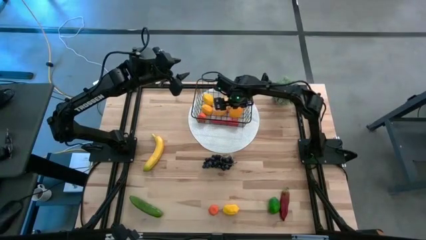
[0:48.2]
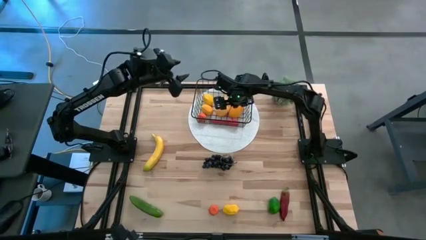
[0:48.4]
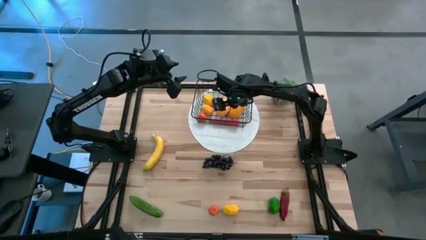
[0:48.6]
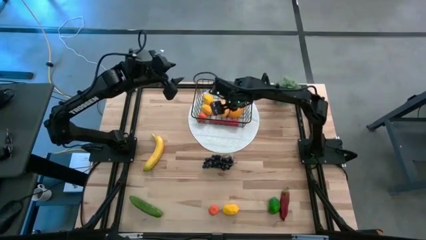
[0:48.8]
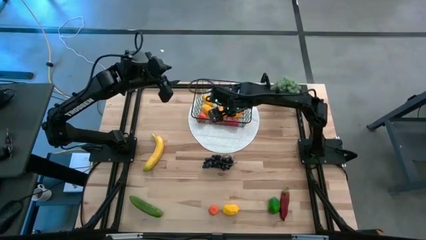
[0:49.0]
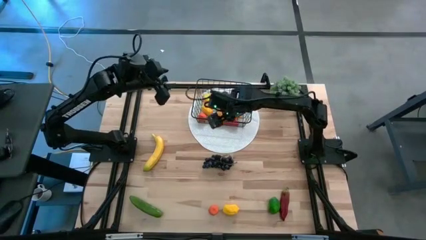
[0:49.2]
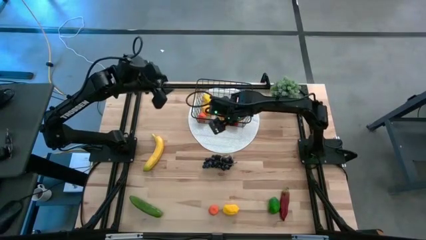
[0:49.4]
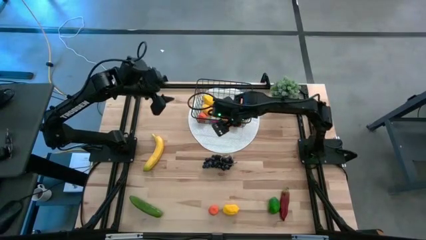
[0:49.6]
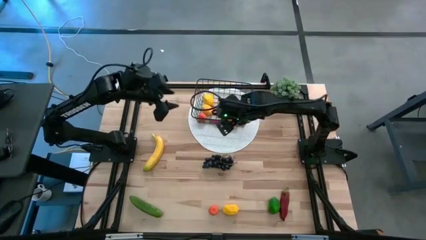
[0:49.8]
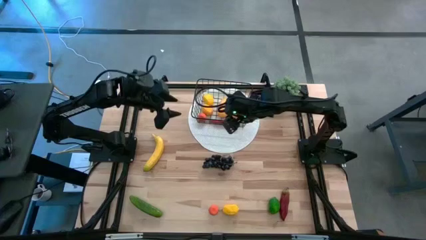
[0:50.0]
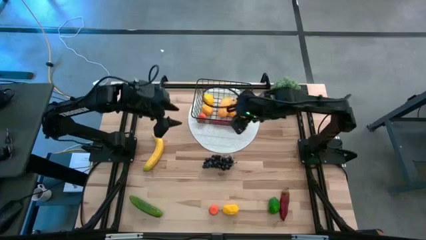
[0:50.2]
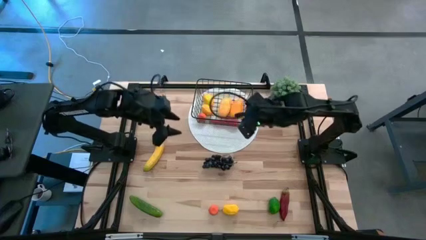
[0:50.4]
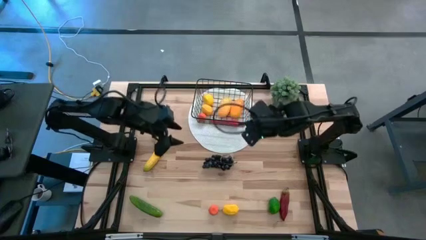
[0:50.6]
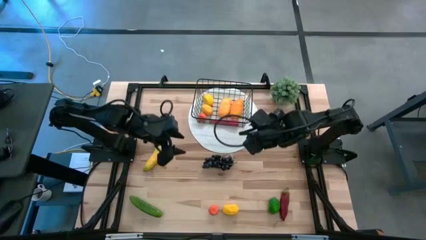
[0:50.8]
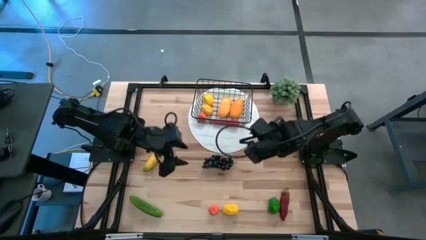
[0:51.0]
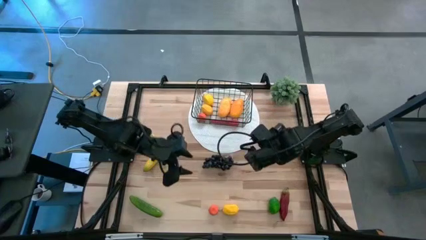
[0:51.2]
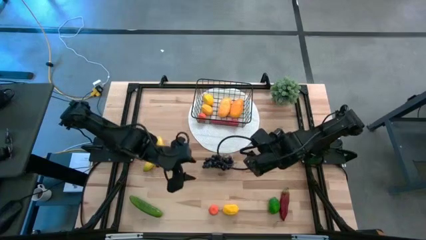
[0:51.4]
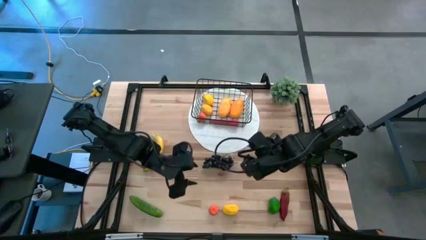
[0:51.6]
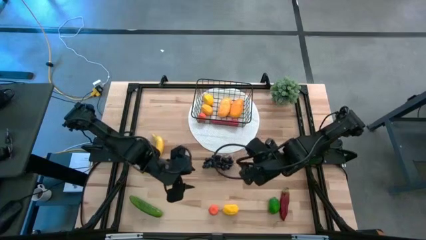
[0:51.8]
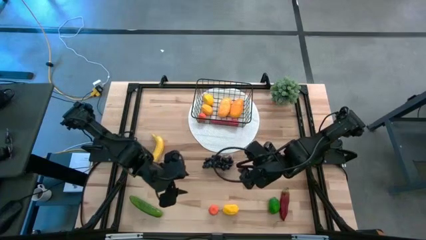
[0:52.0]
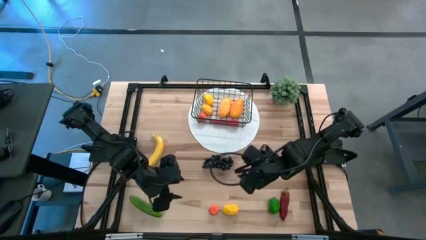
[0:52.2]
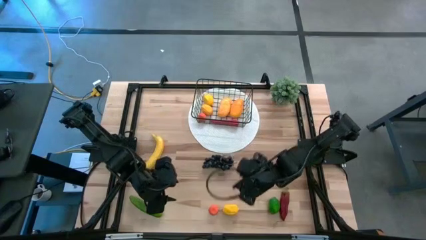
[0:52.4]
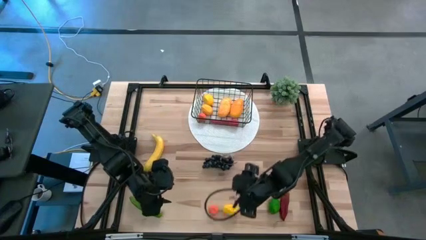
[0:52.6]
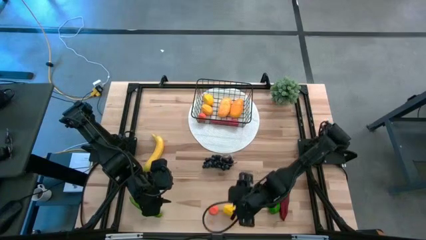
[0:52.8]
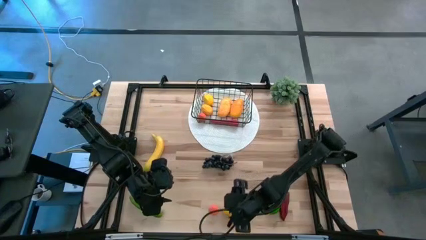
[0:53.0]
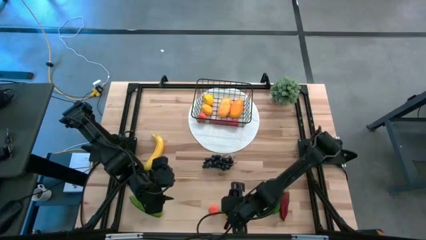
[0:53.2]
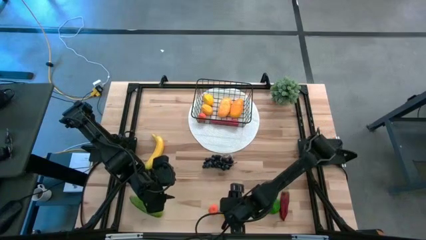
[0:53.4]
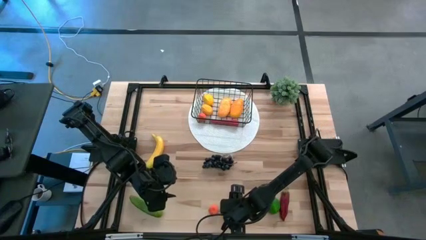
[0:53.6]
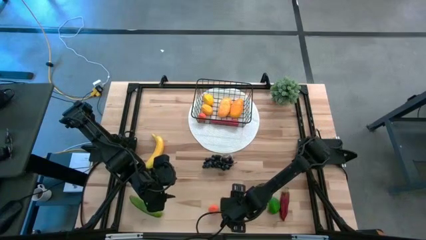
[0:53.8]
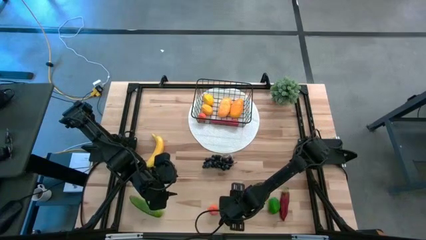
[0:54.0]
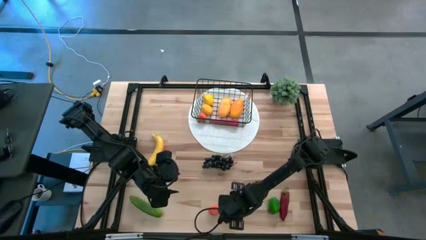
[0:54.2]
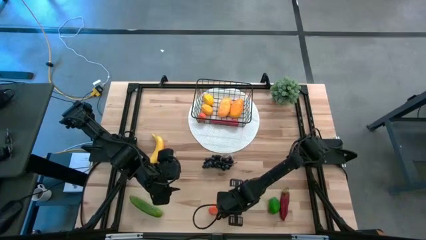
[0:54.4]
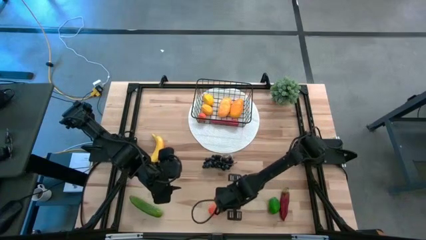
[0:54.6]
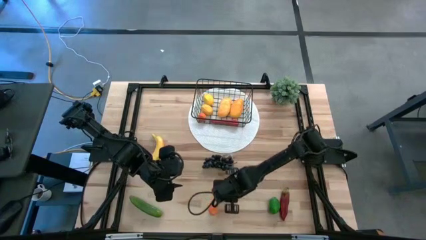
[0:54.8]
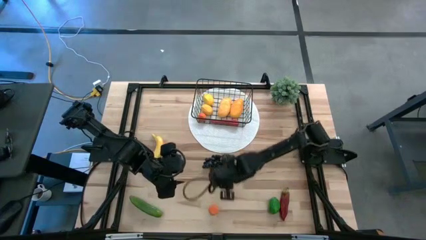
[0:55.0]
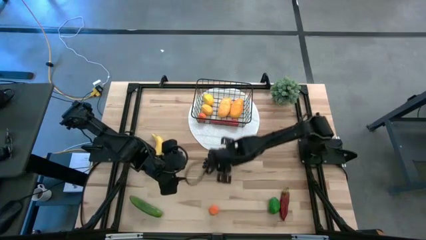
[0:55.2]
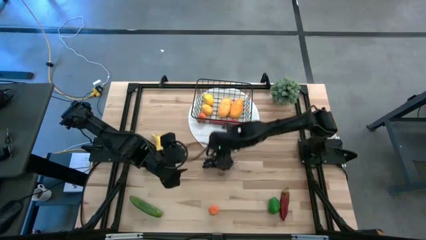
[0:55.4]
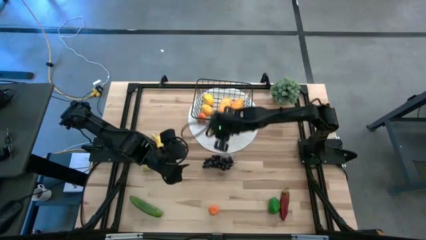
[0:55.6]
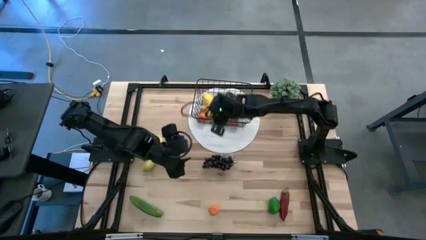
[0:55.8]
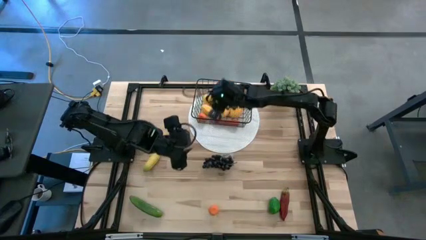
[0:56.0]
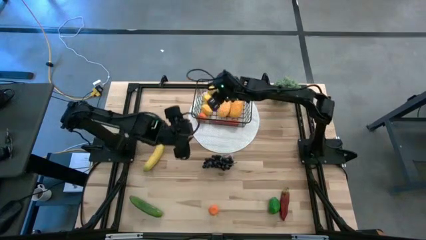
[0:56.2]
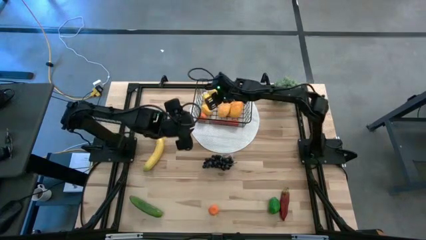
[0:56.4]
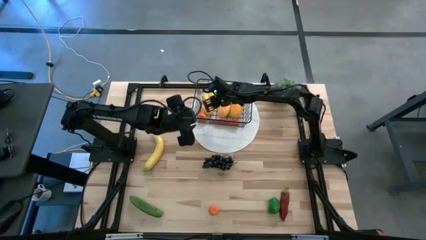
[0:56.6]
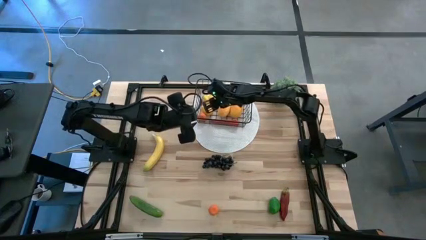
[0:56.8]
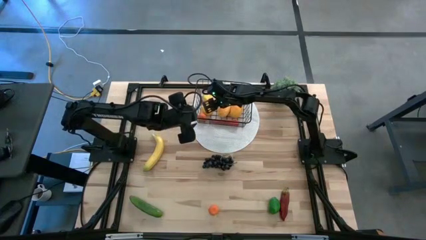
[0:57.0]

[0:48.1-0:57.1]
Task: Build produce basket
Put the lemon into mesh basket

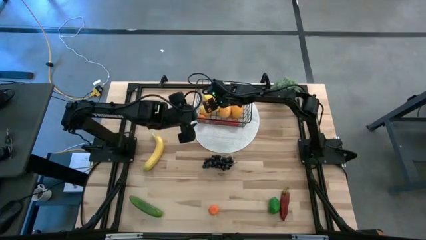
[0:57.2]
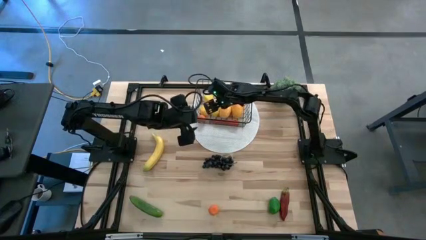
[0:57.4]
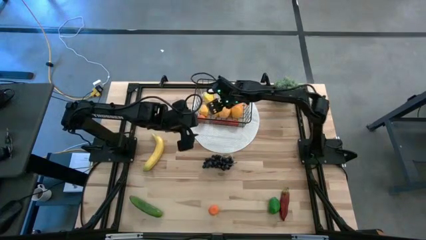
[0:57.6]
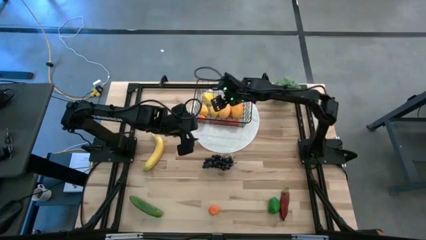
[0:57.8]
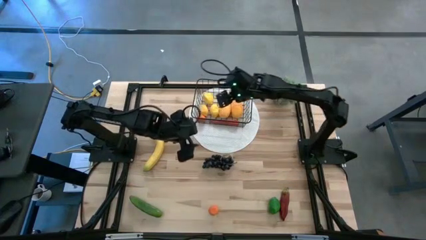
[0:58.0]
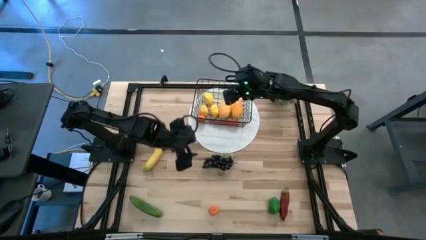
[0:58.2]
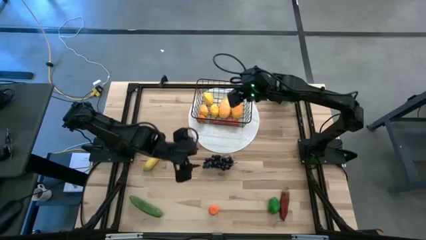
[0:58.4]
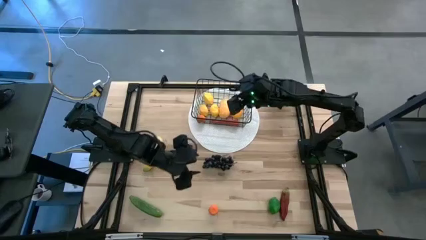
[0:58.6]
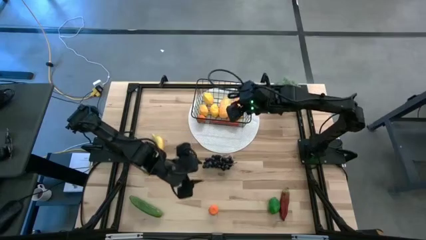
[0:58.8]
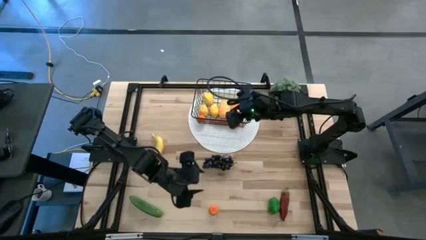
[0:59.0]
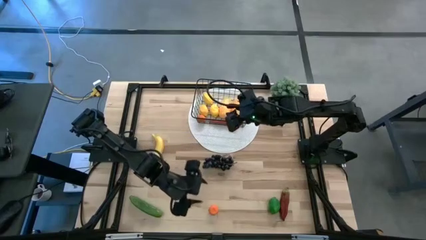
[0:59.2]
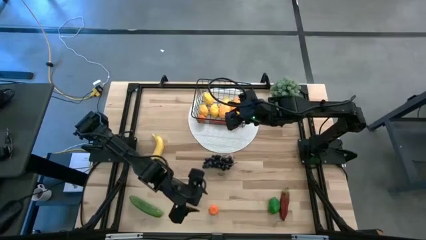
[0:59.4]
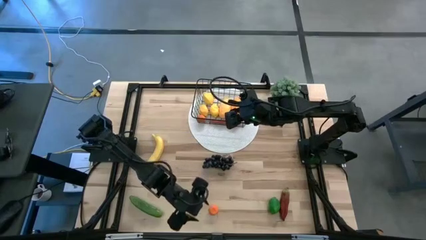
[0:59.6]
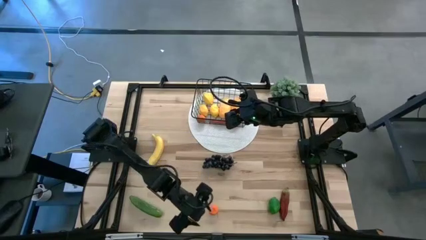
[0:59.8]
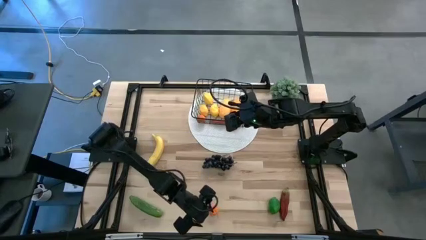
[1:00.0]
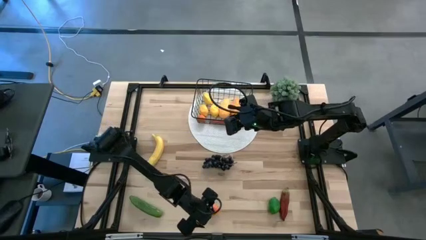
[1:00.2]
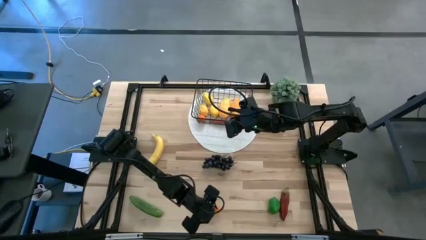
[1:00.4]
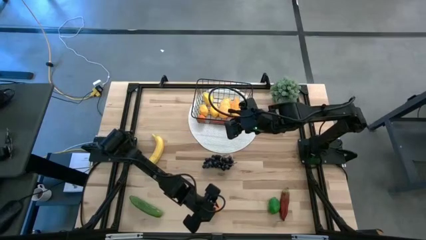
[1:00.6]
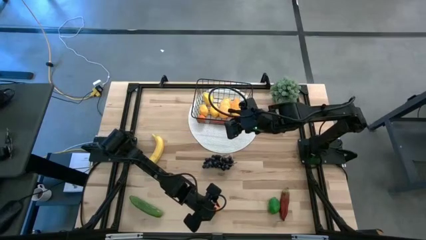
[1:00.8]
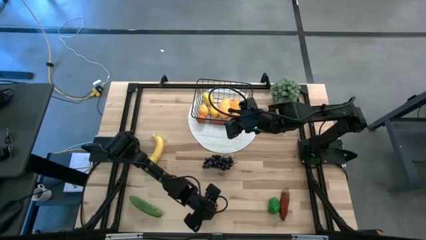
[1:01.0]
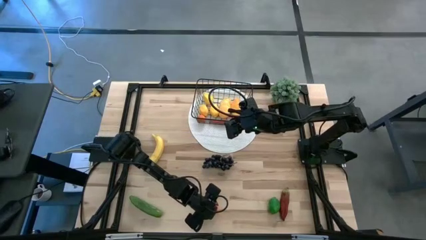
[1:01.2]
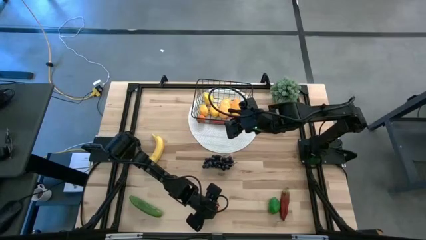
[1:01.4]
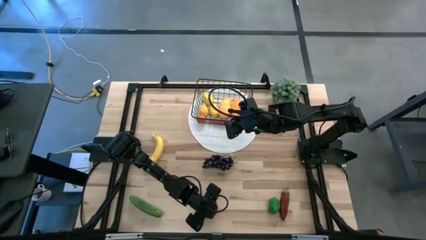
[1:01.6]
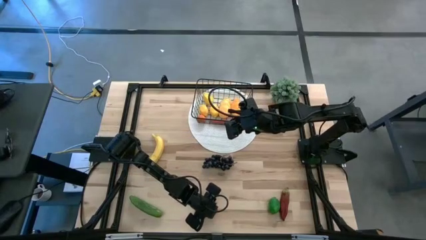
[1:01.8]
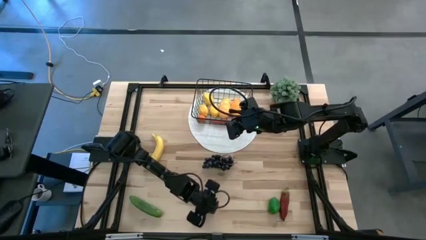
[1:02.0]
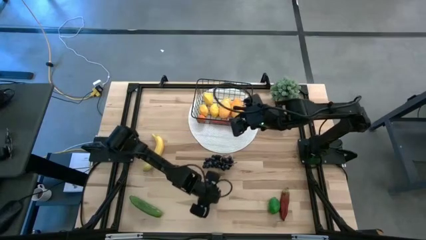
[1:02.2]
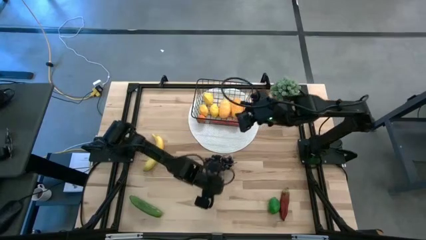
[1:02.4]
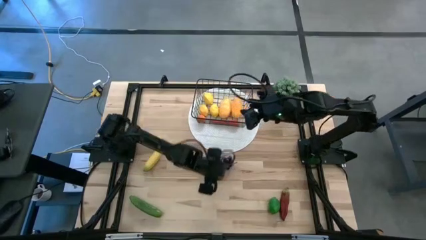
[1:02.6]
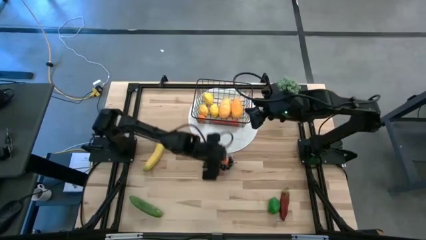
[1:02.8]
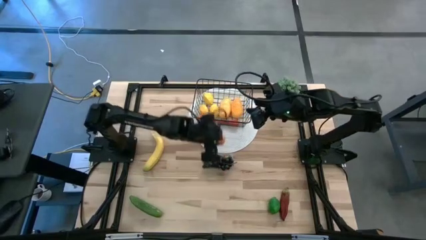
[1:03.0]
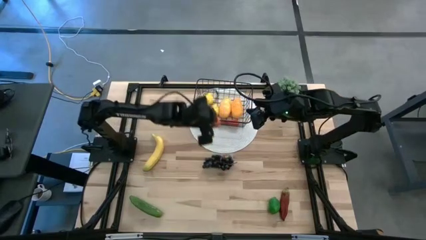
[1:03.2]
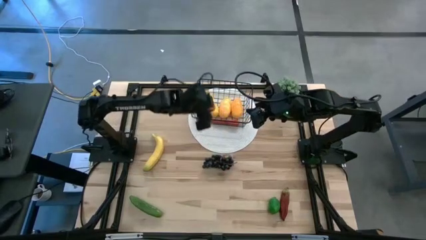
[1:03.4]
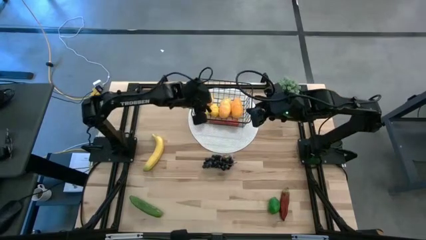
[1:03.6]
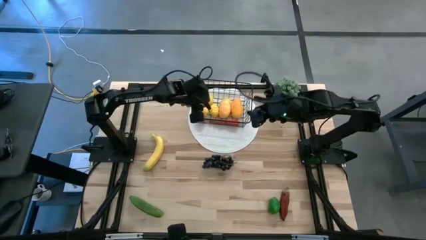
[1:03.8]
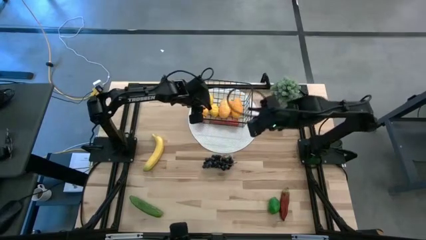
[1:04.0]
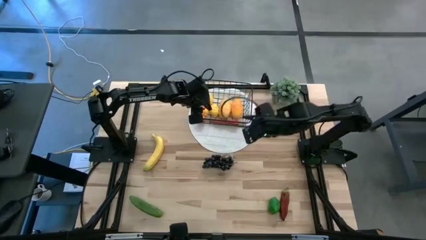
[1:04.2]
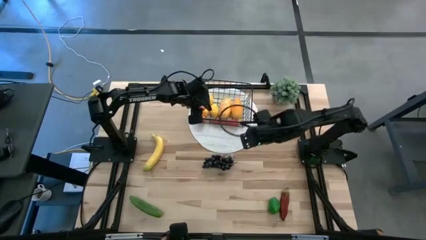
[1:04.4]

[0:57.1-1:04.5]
Put the orange into mesh basket
